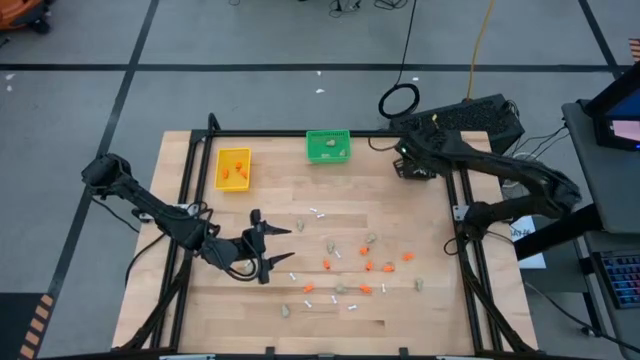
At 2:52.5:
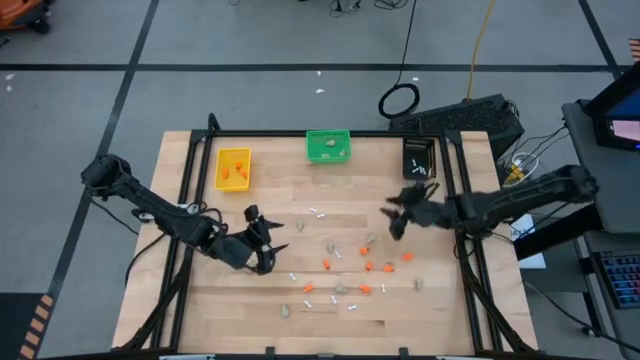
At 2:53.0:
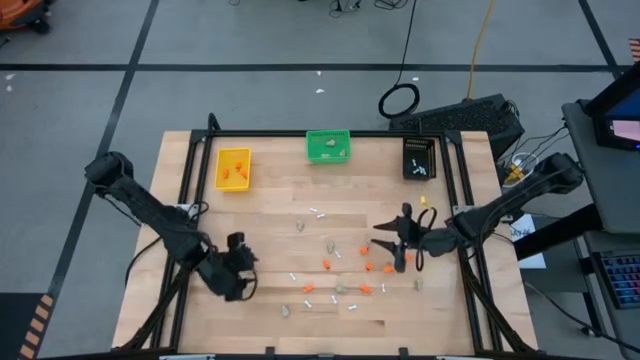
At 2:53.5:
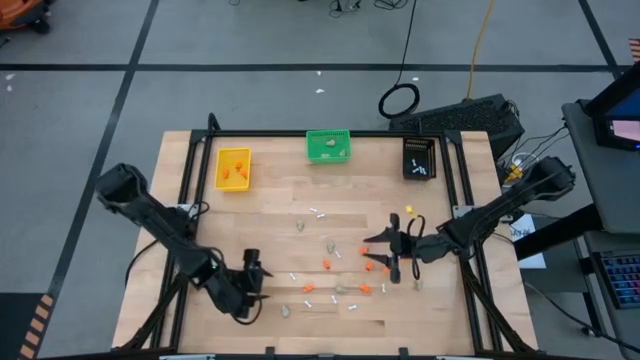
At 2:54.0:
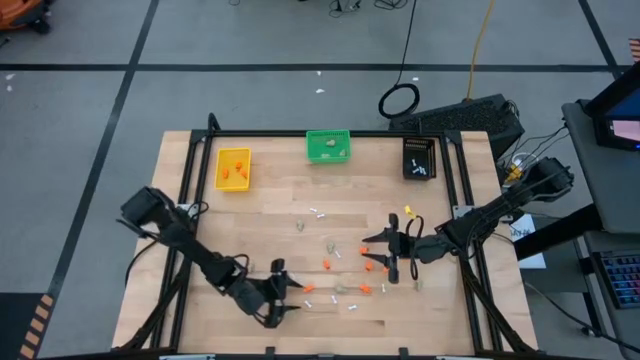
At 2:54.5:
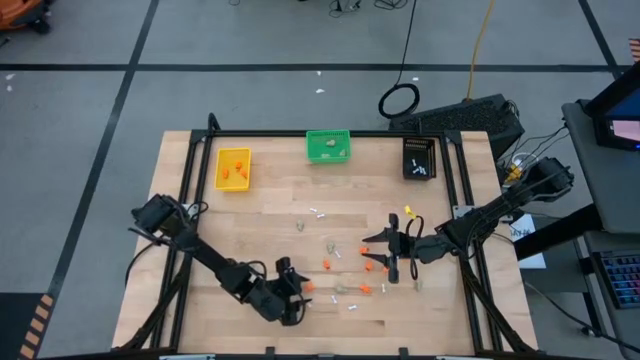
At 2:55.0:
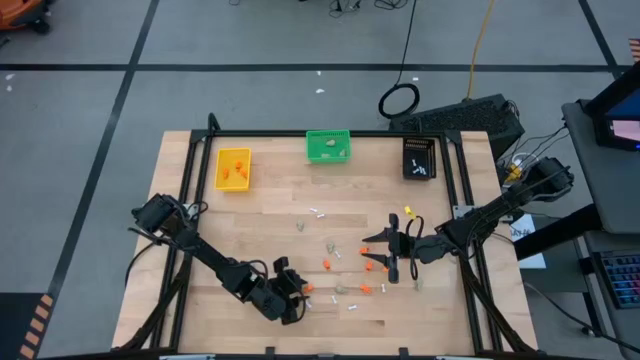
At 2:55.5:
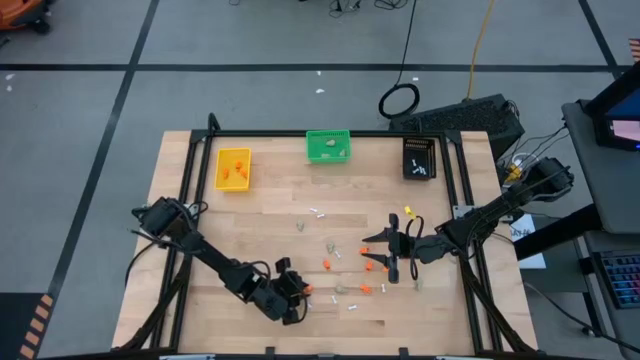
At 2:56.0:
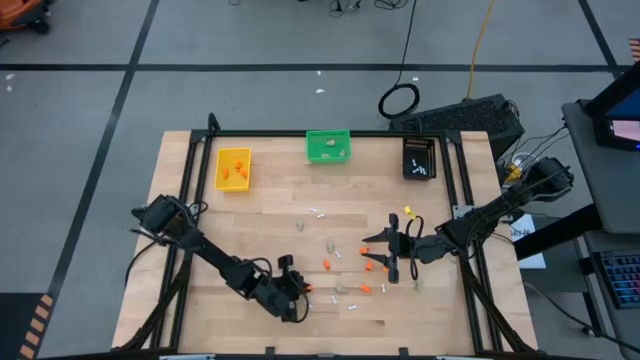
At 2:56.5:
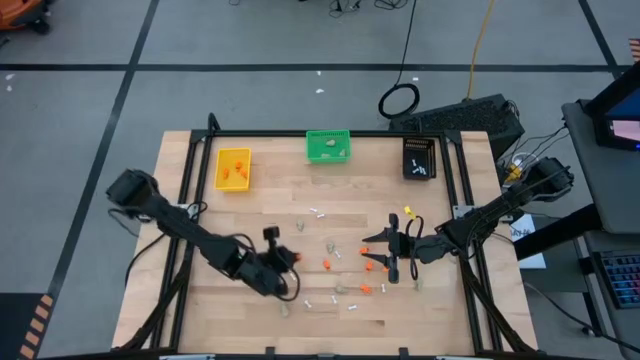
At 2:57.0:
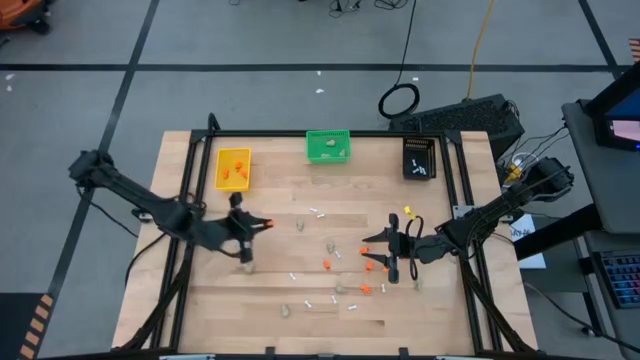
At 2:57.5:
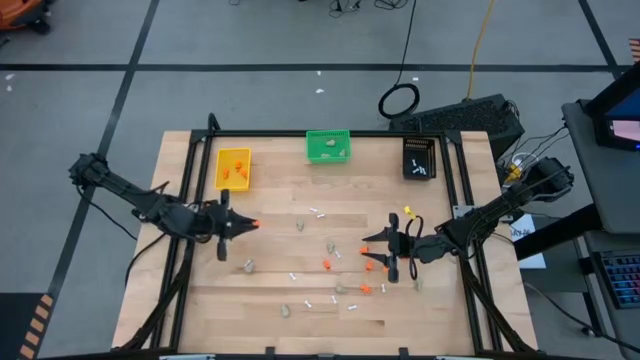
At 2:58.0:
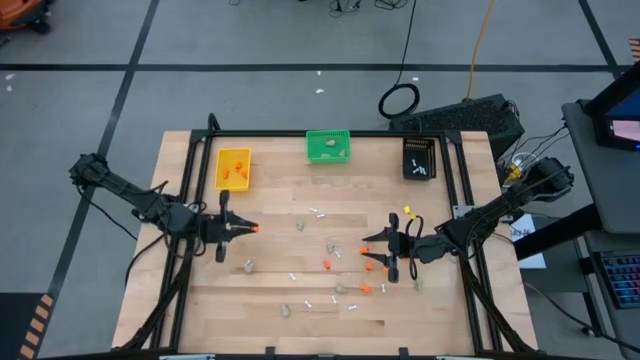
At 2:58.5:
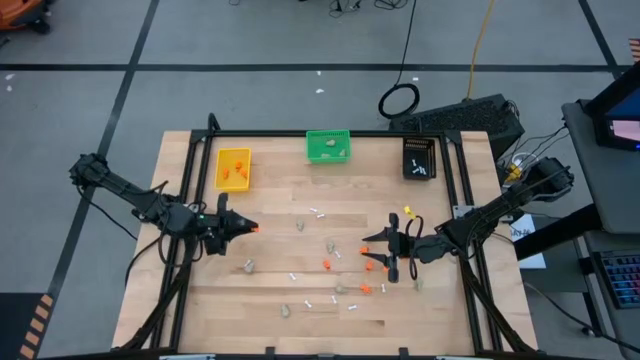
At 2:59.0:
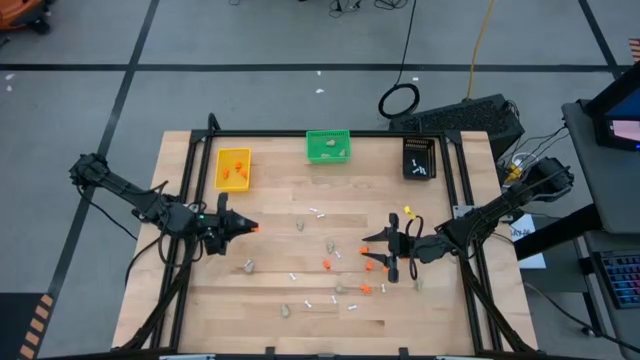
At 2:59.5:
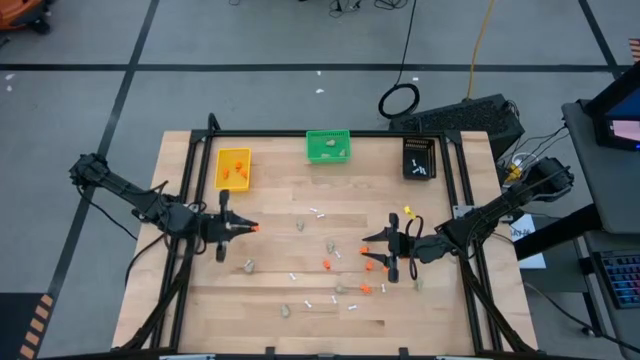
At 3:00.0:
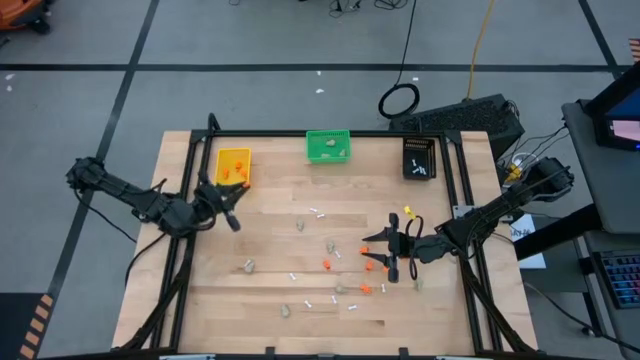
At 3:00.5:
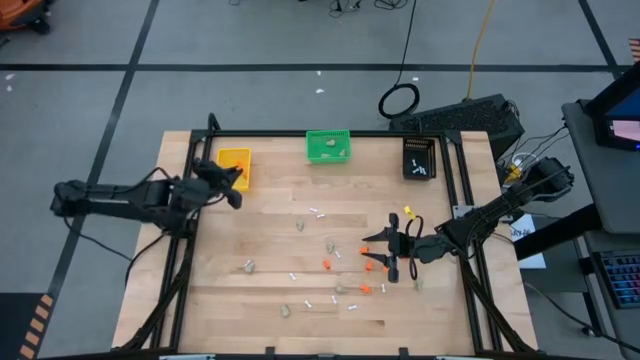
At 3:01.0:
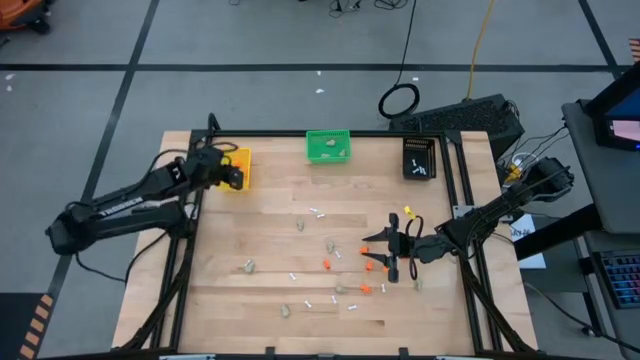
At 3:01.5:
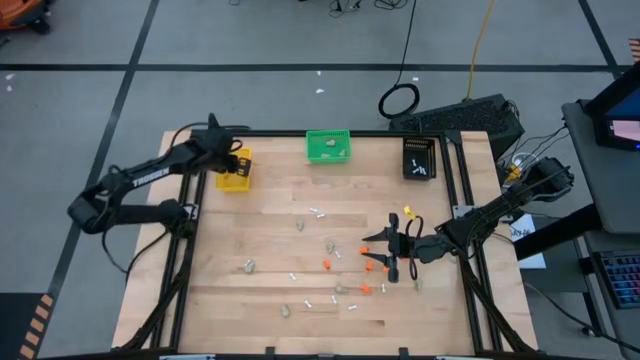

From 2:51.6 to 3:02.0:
Task: Sort Halloween decoration
Put the orange skeleton toy into the yellow bin

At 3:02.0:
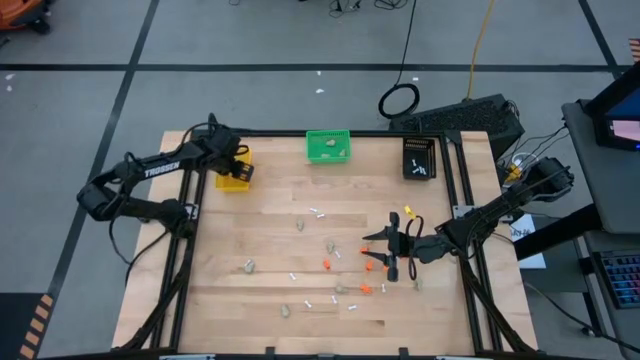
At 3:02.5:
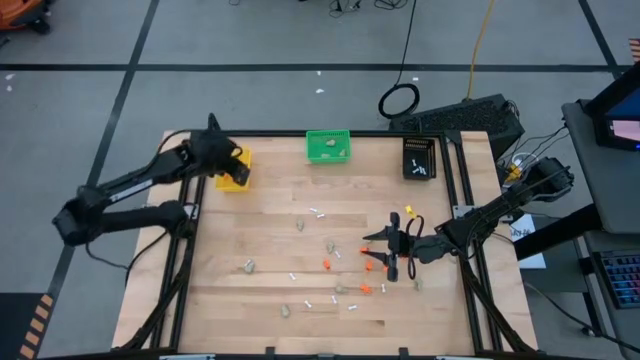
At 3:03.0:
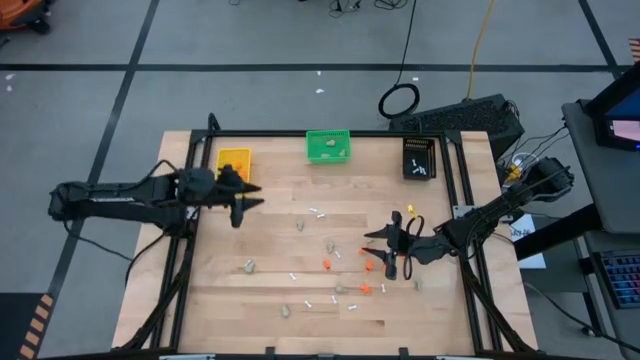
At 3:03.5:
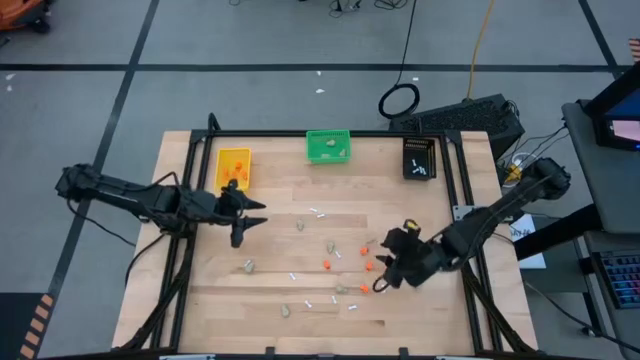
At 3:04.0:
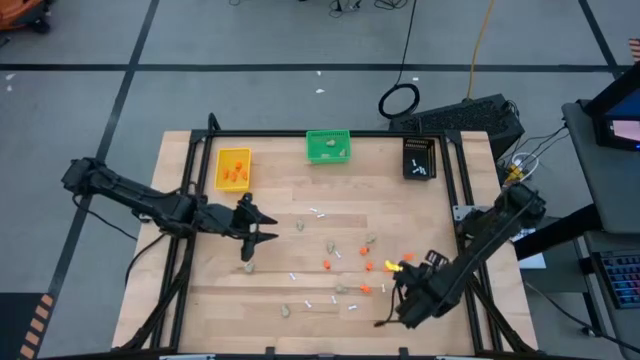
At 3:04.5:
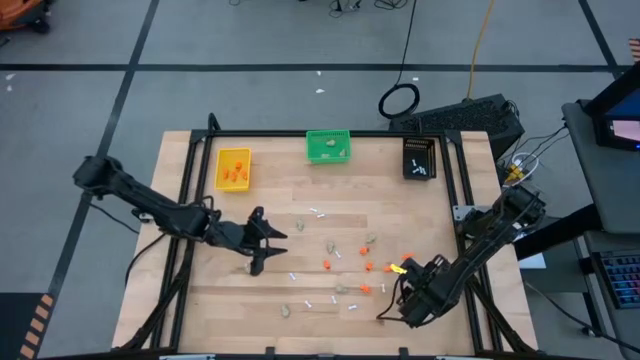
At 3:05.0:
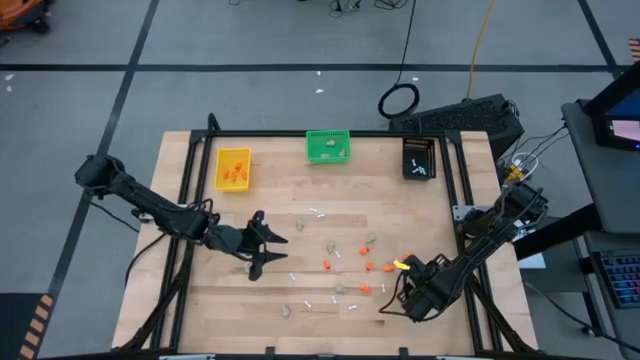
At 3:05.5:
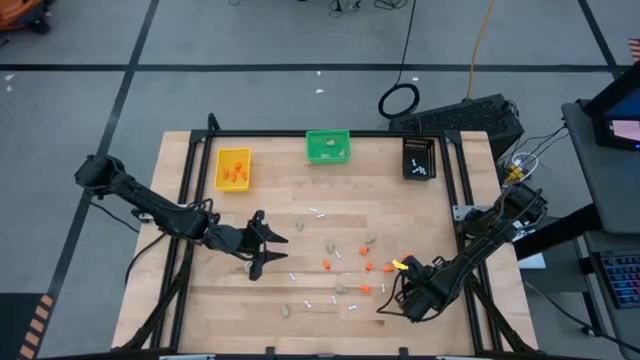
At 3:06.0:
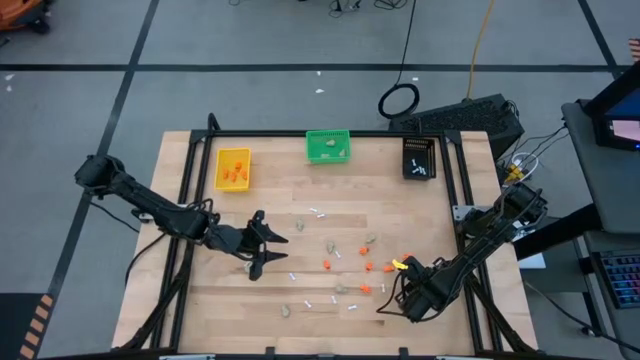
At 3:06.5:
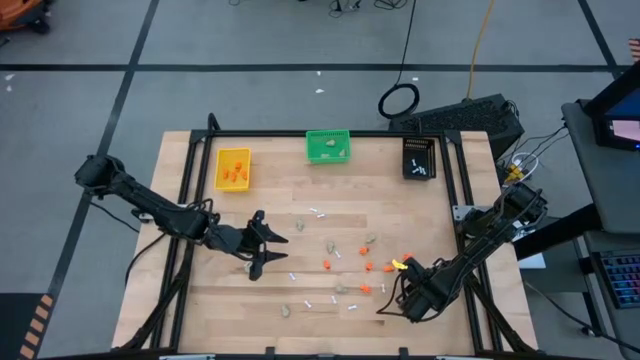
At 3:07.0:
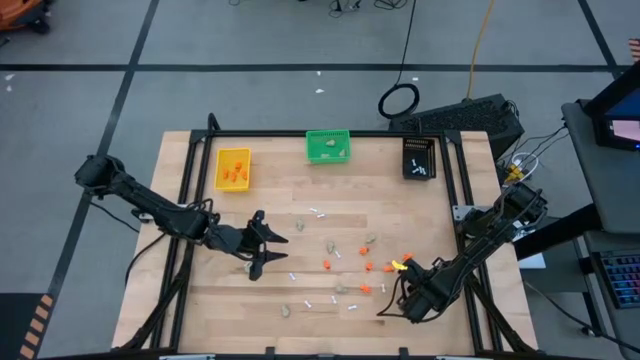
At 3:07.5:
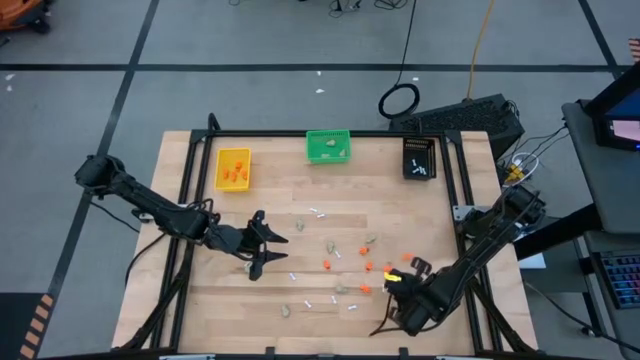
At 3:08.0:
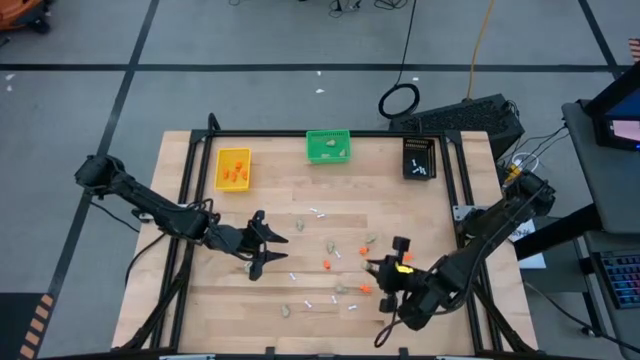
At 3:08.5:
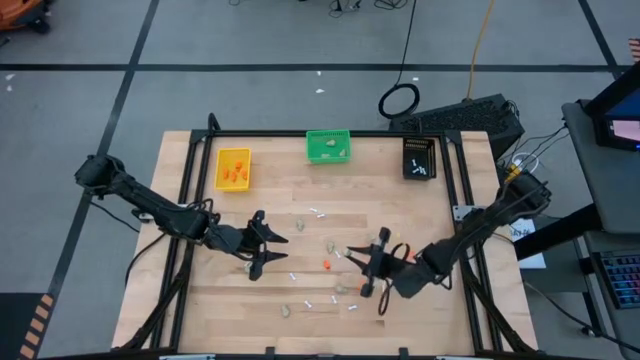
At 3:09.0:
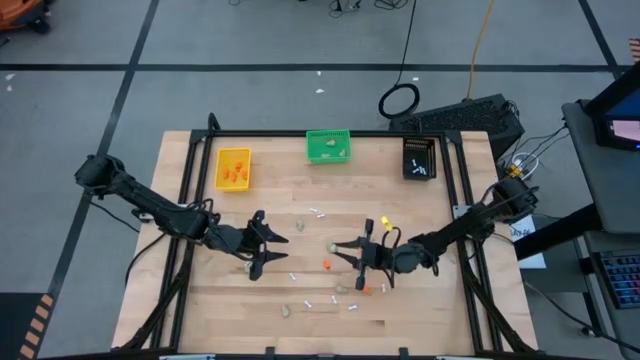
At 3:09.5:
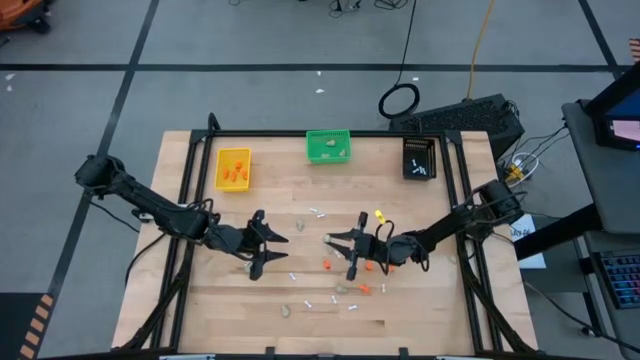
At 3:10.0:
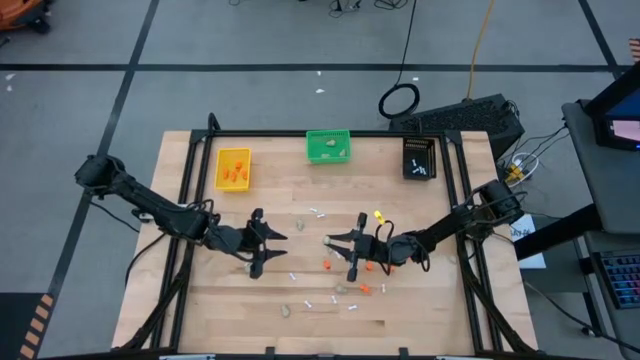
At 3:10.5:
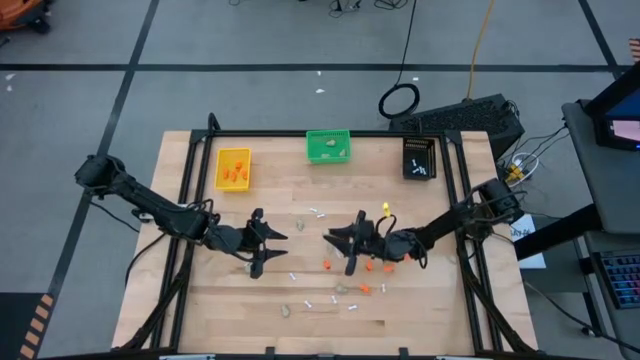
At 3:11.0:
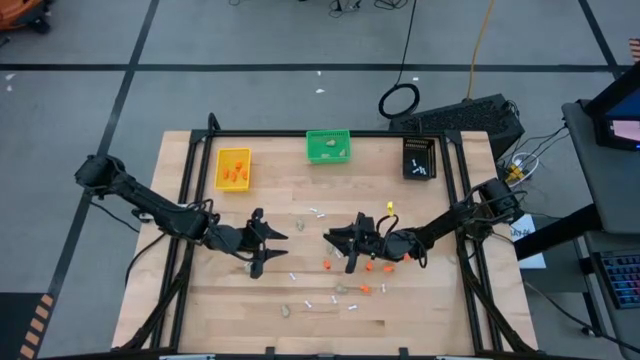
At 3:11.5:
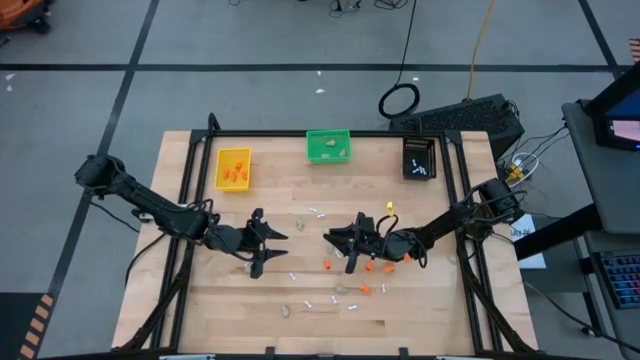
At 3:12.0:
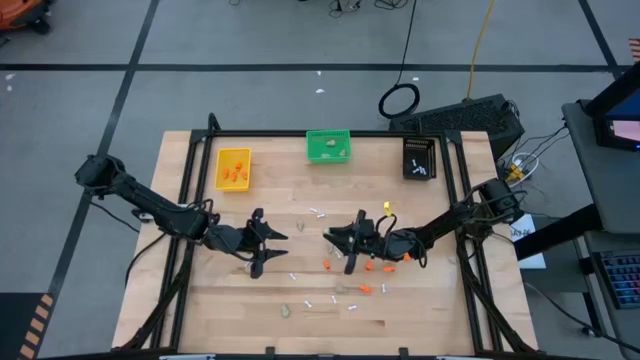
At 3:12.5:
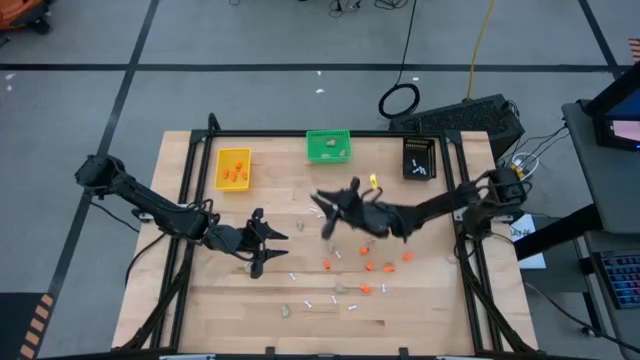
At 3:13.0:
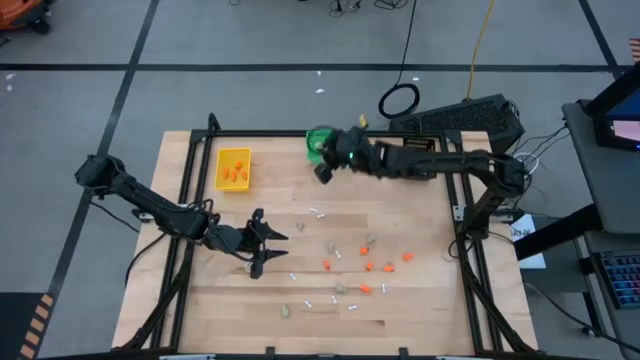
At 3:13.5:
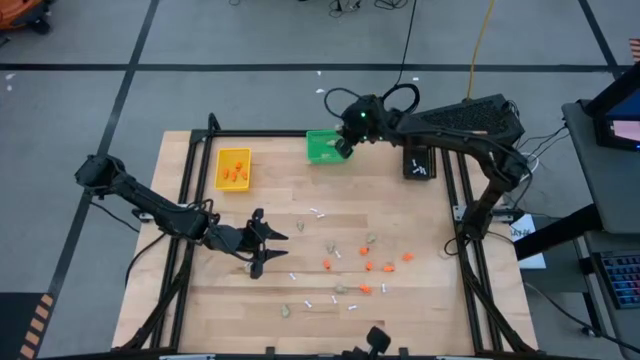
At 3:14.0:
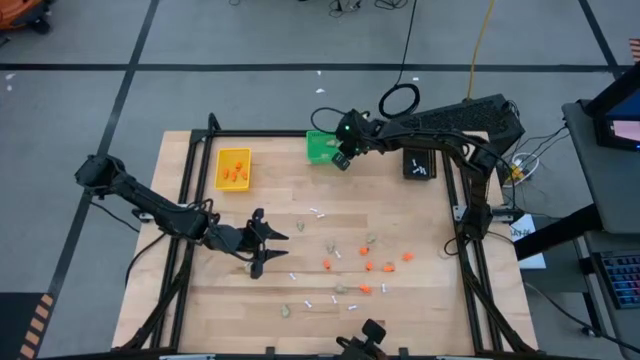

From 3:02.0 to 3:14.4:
Put the gray skull toy into the green bin
